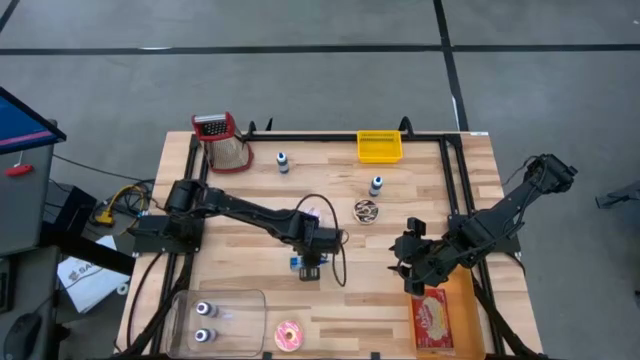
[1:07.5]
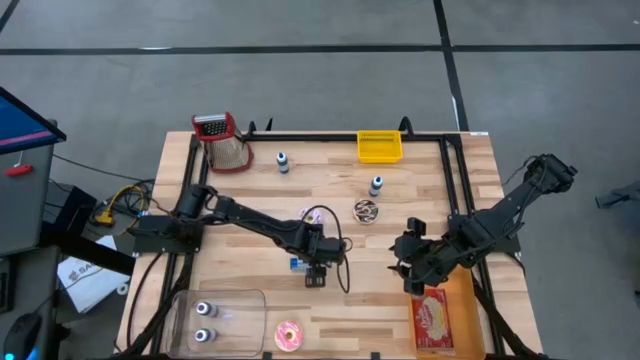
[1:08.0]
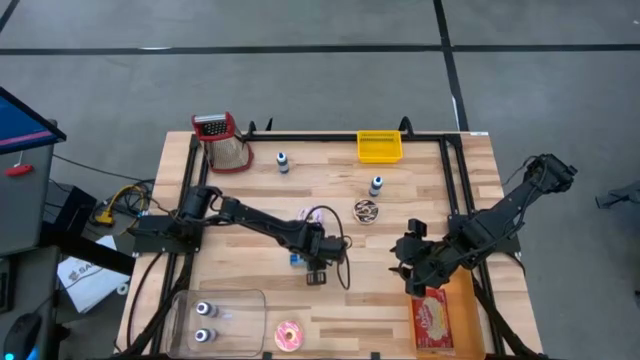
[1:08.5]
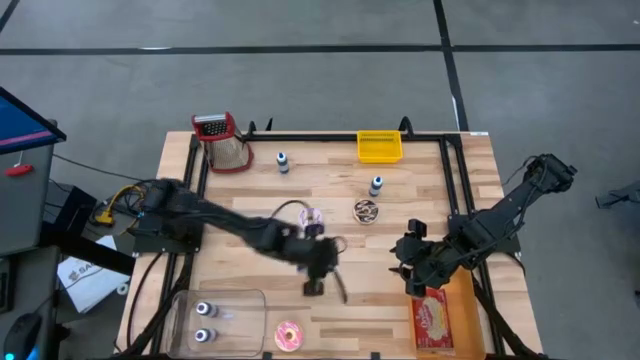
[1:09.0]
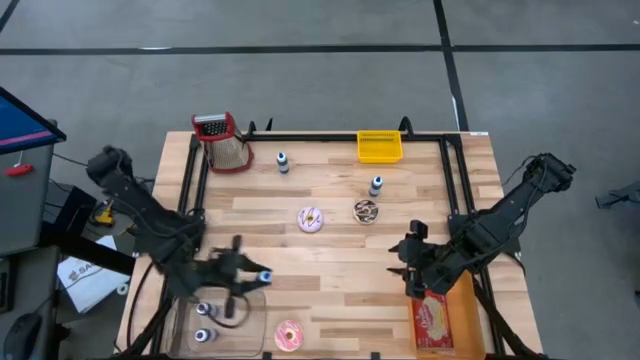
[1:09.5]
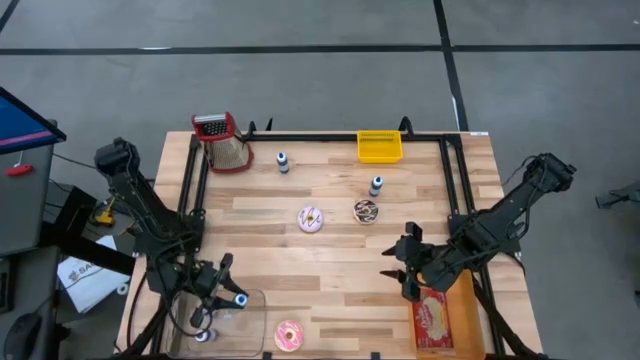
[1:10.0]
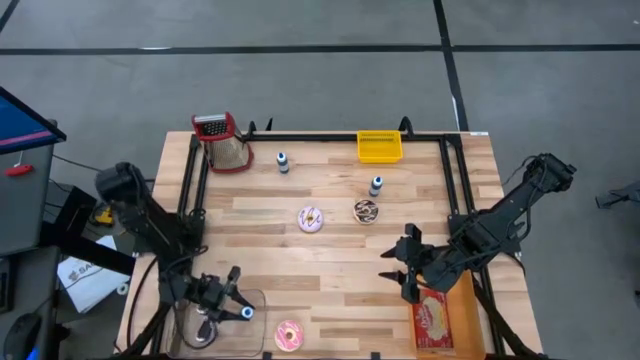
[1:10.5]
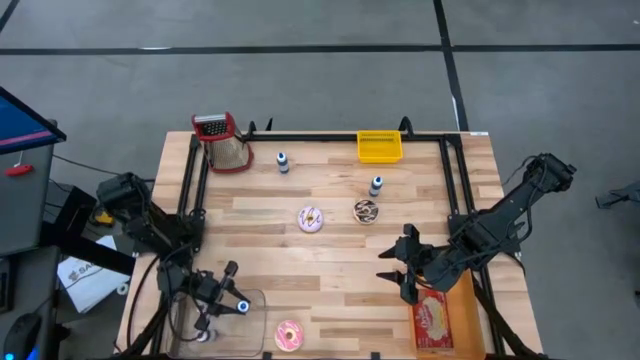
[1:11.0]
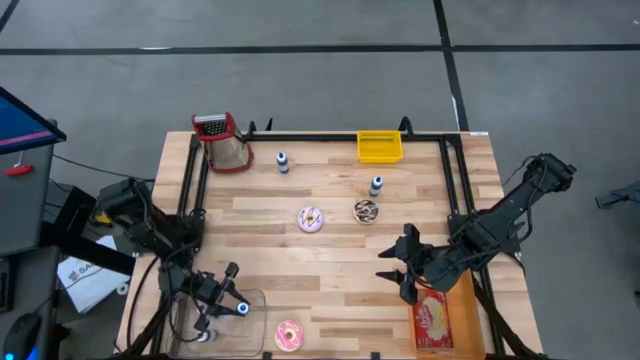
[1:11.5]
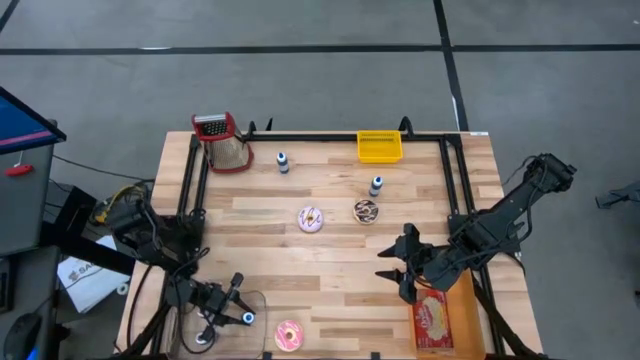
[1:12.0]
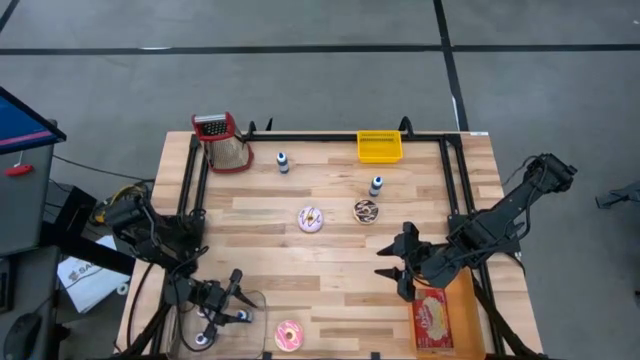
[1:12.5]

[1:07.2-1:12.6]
Put the bottom blue food coloring bottle into the transparent bin

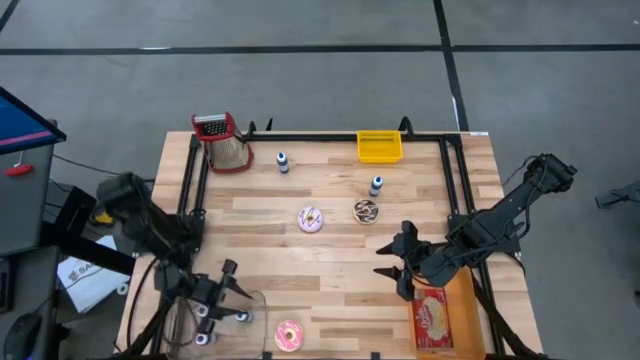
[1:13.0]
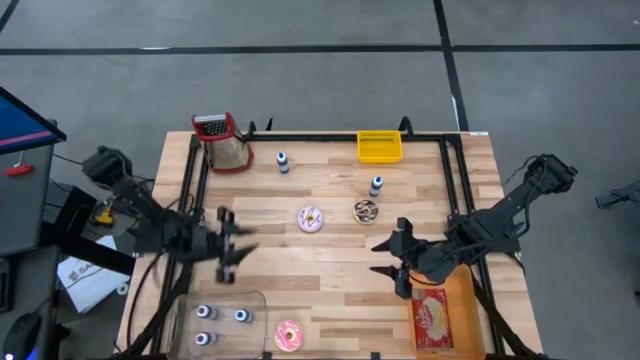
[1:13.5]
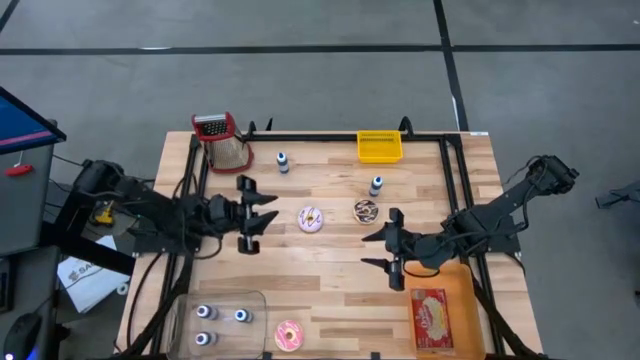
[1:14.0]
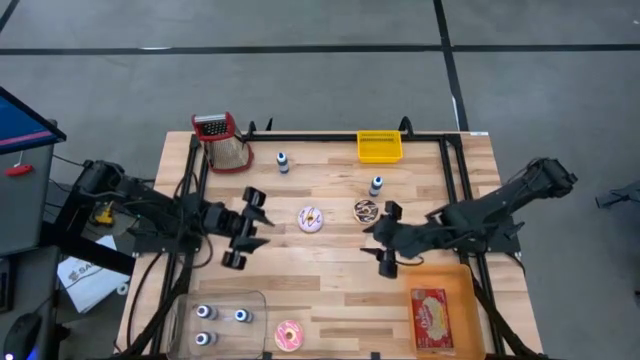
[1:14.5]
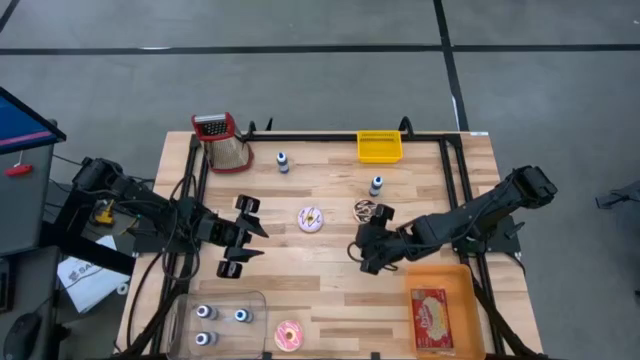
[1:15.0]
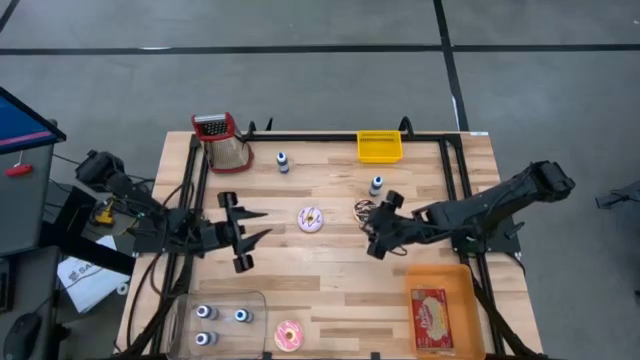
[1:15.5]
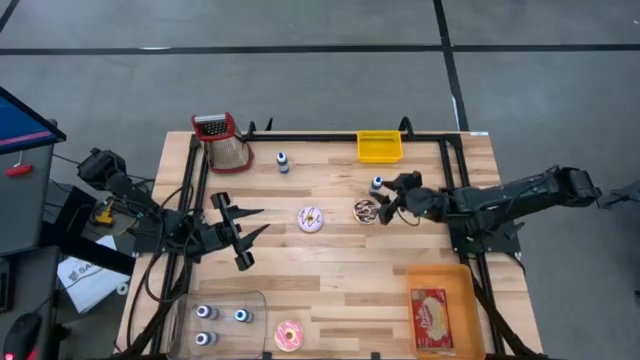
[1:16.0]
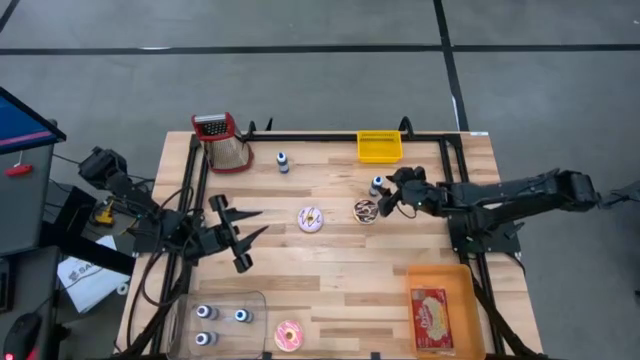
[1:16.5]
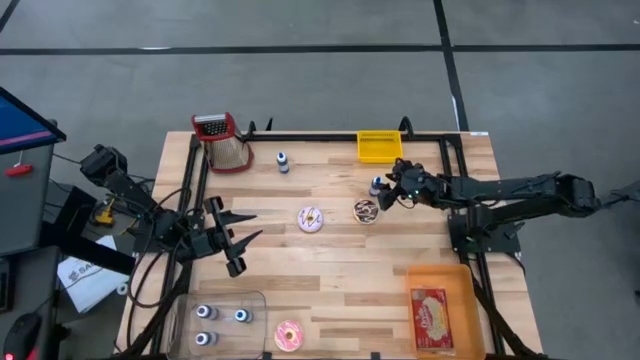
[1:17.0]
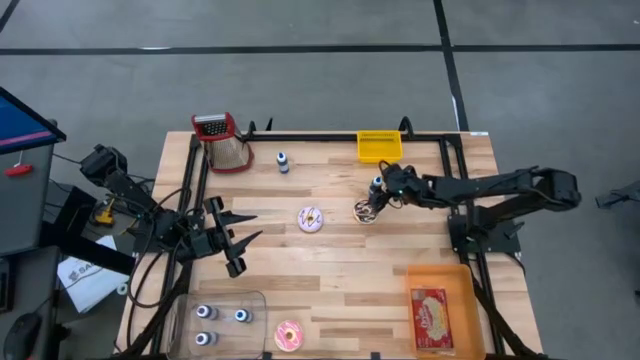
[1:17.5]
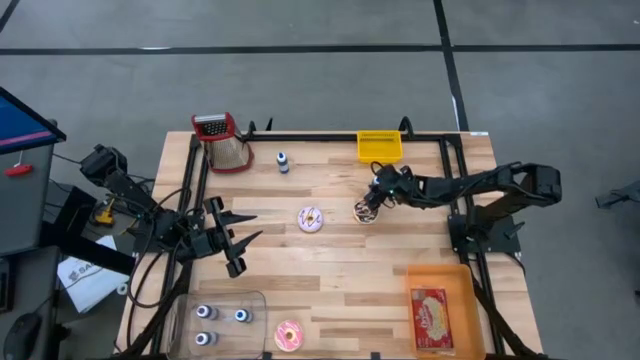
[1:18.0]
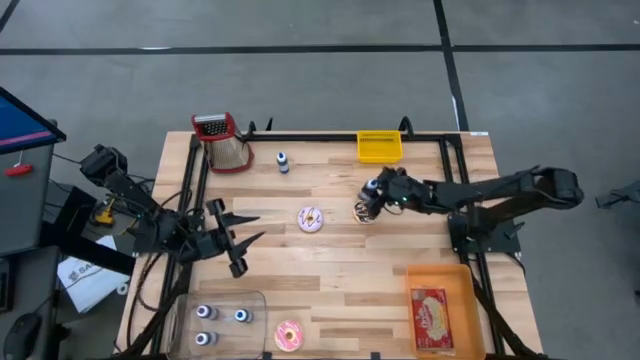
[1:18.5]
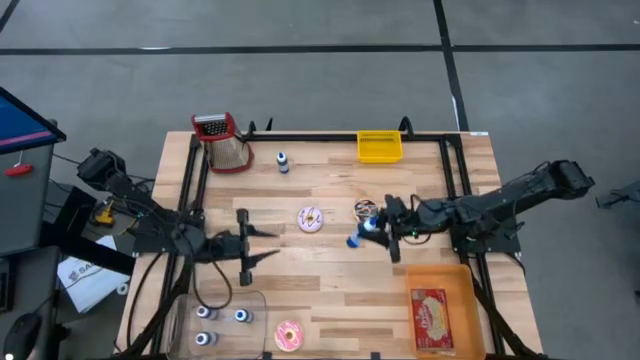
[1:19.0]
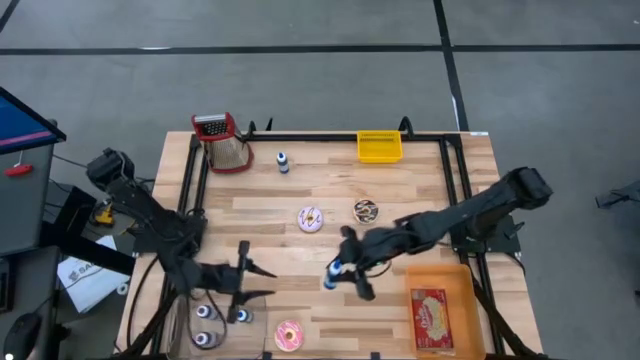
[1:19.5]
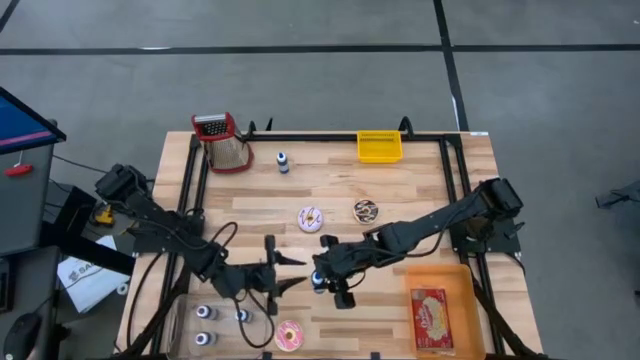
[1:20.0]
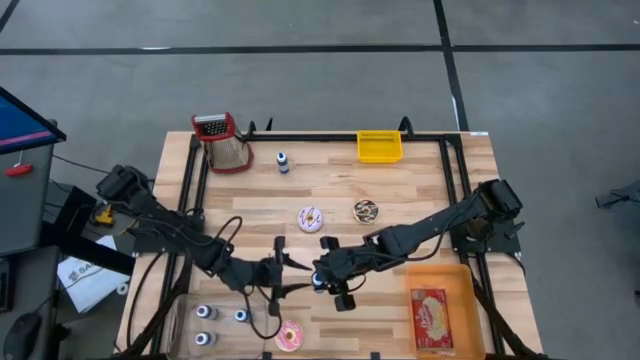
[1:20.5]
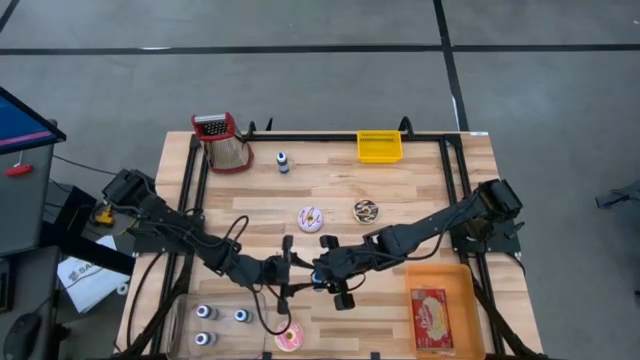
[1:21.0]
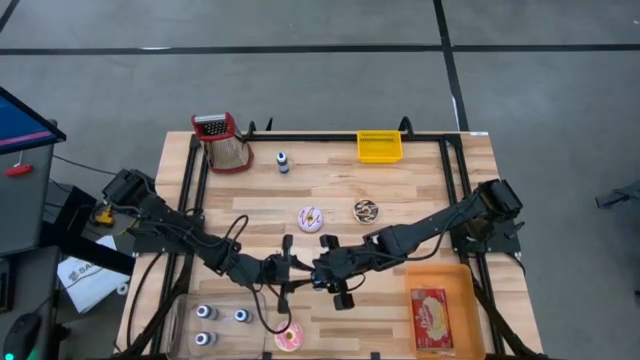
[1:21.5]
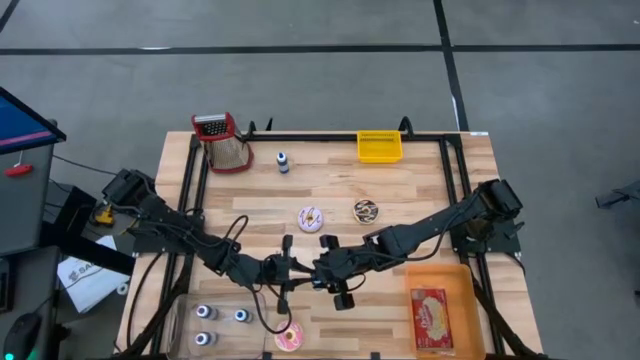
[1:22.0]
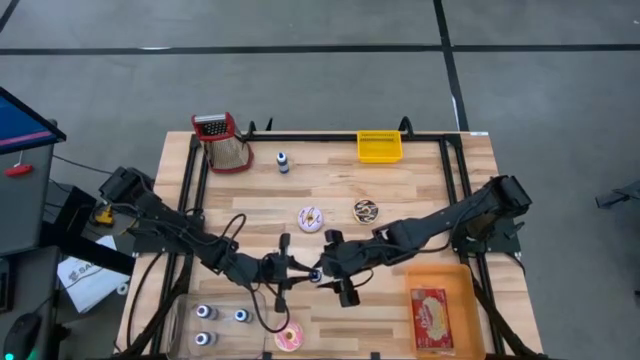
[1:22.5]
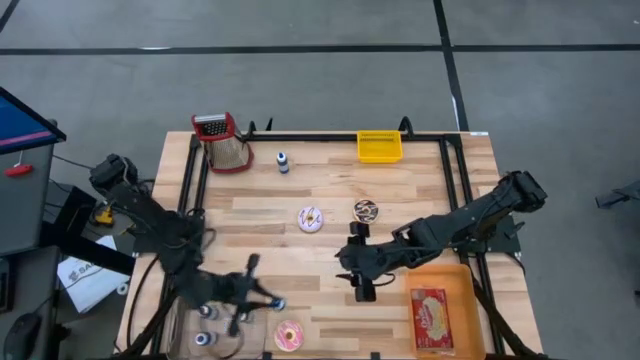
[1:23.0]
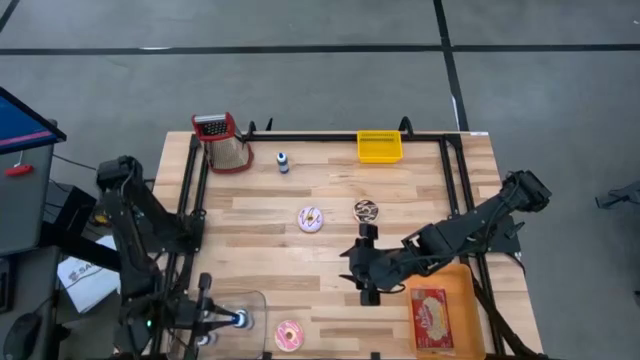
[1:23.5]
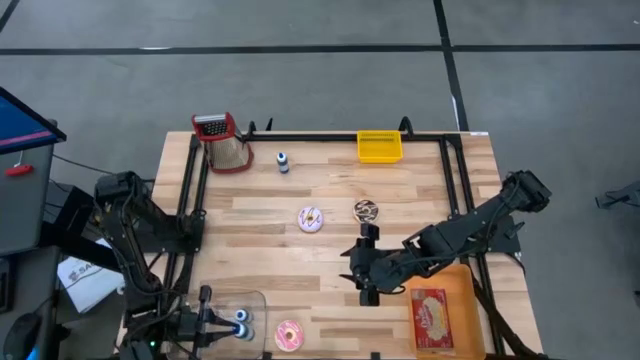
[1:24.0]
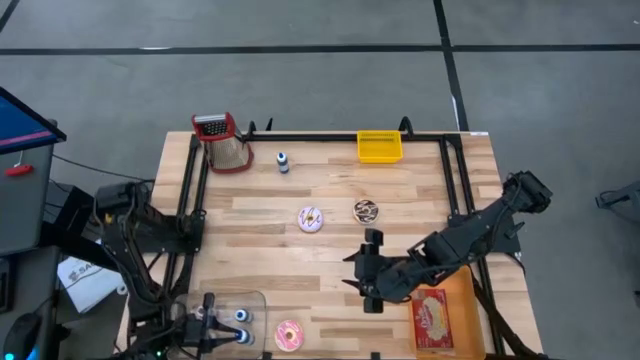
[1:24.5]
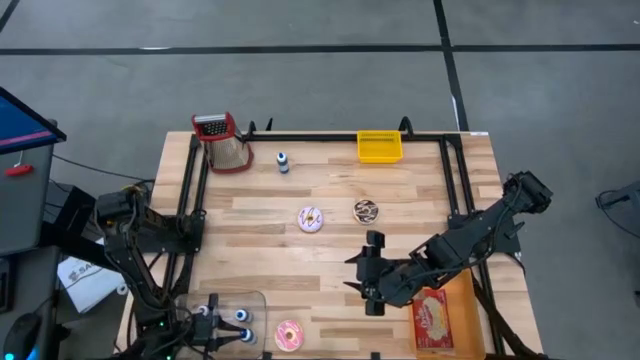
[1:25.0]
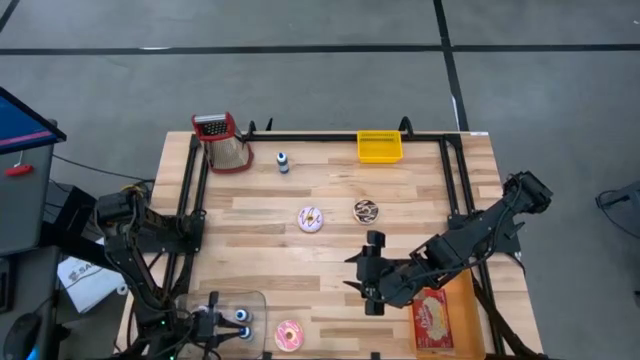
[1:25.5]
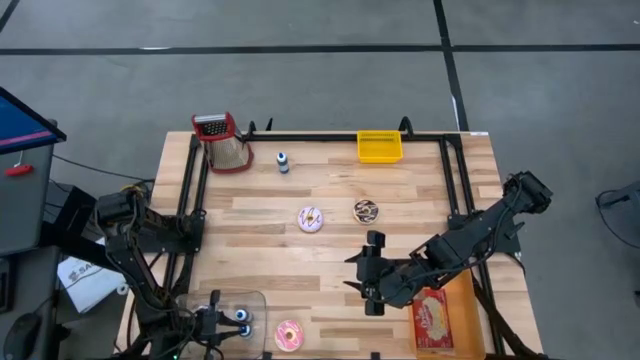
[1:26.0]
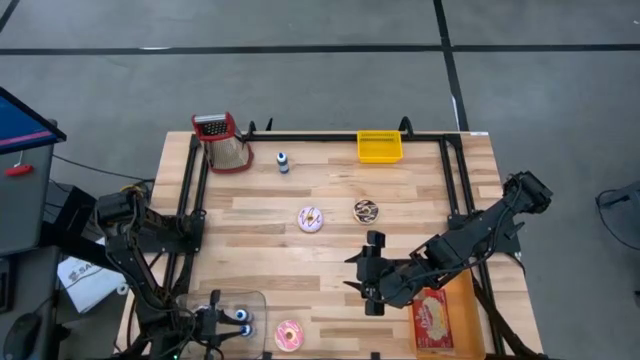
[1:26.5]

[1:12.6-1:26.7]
Put the right blue food coloring bottle into the transparent bin
